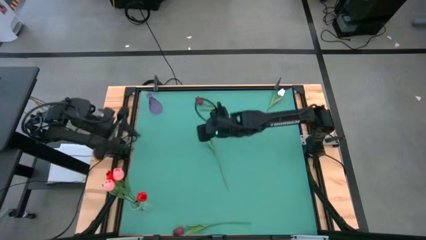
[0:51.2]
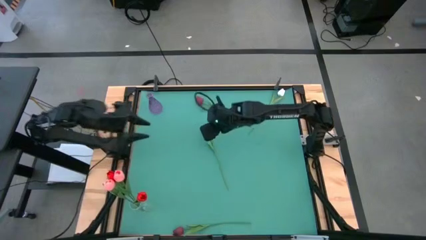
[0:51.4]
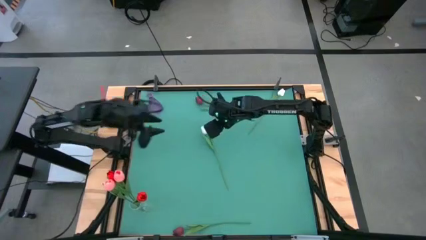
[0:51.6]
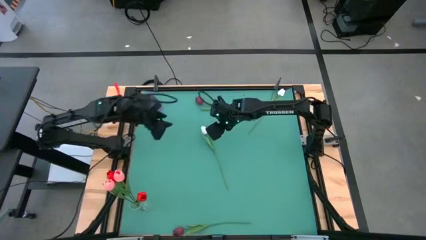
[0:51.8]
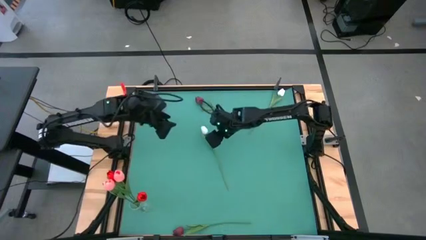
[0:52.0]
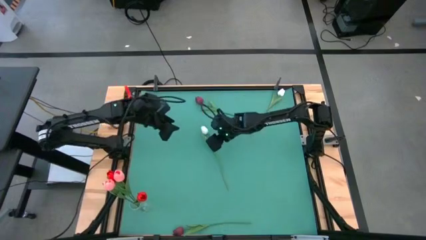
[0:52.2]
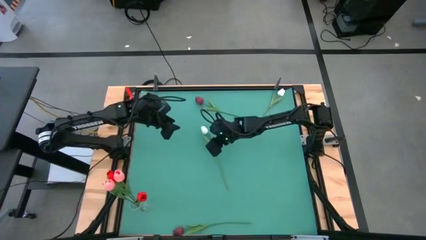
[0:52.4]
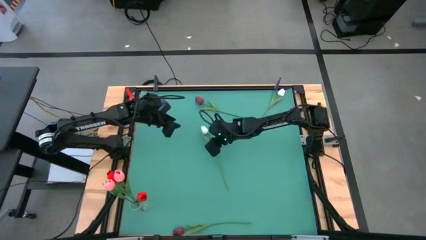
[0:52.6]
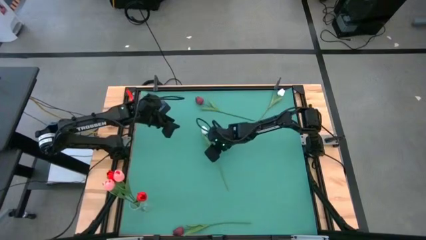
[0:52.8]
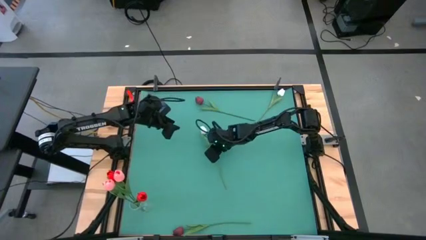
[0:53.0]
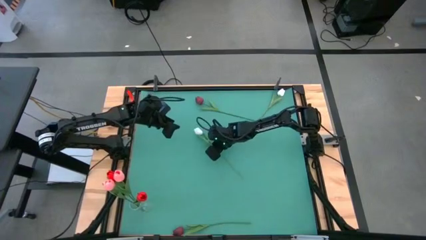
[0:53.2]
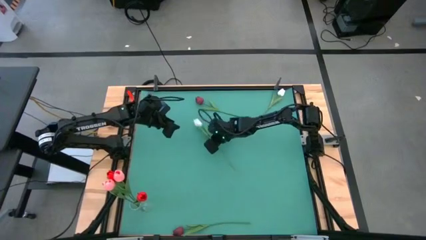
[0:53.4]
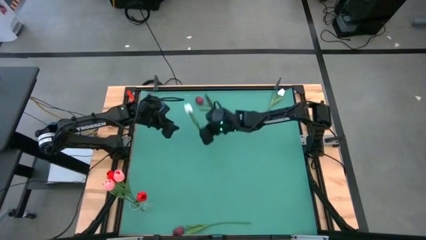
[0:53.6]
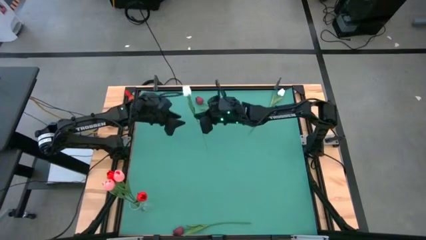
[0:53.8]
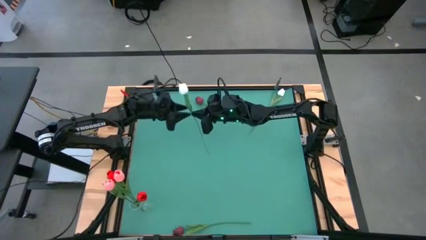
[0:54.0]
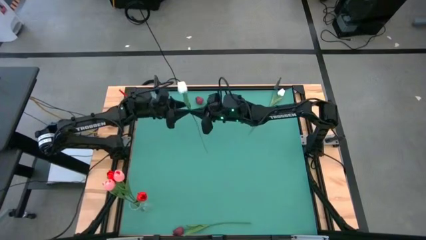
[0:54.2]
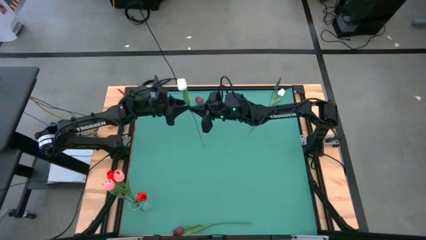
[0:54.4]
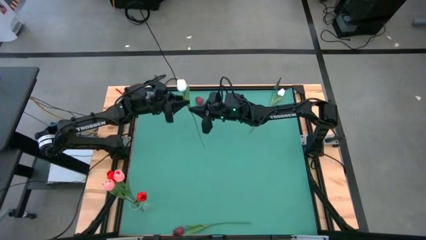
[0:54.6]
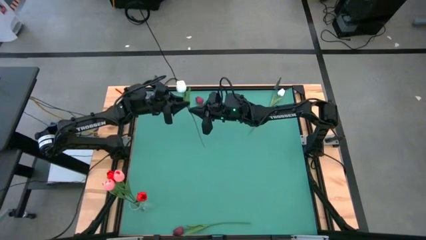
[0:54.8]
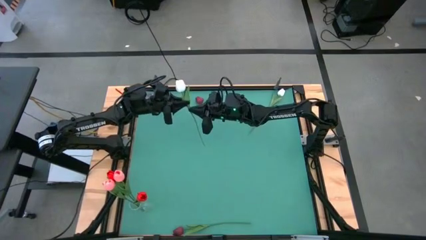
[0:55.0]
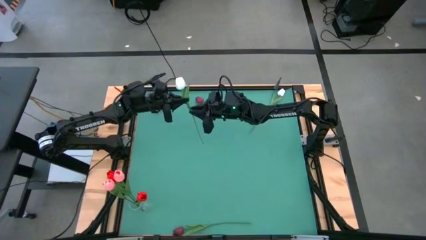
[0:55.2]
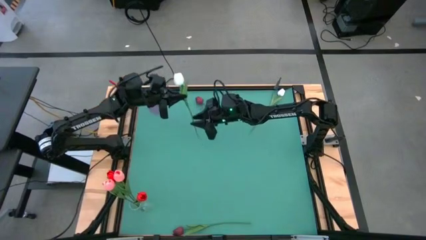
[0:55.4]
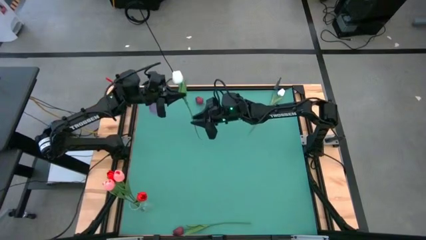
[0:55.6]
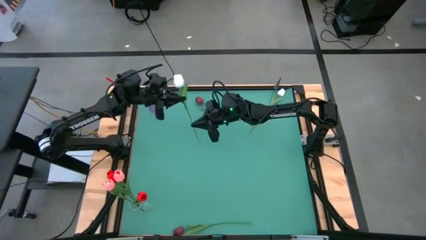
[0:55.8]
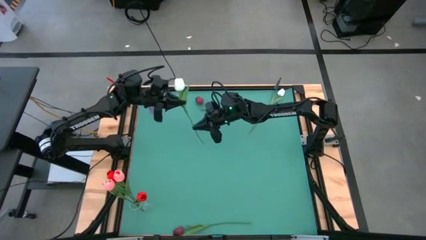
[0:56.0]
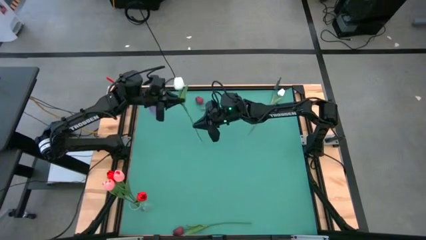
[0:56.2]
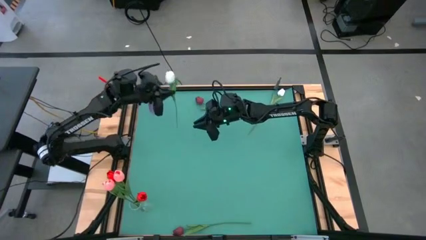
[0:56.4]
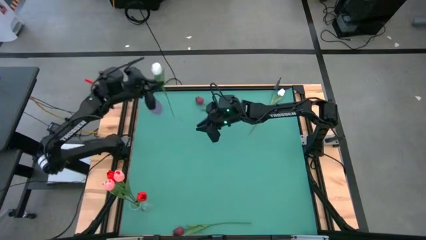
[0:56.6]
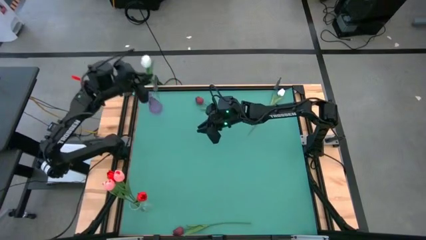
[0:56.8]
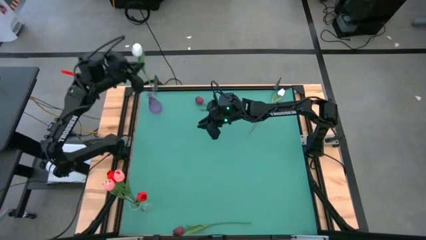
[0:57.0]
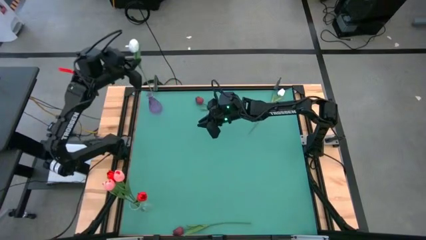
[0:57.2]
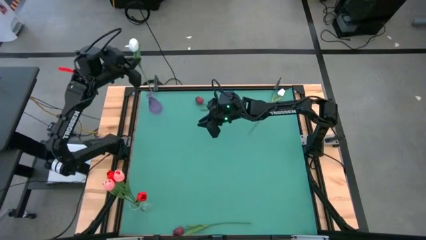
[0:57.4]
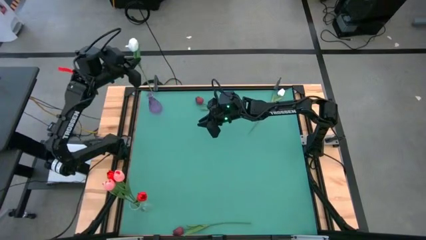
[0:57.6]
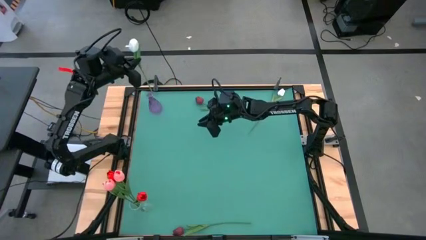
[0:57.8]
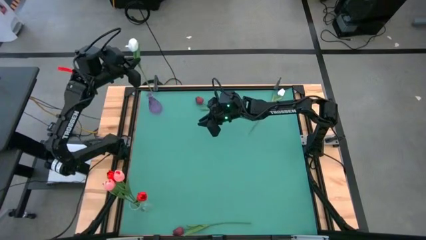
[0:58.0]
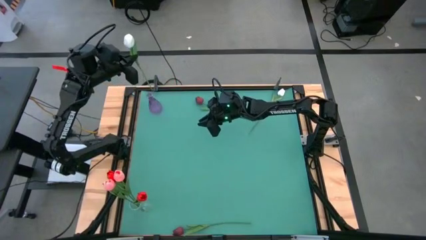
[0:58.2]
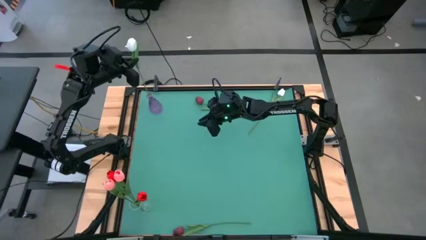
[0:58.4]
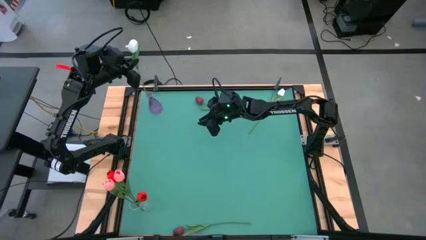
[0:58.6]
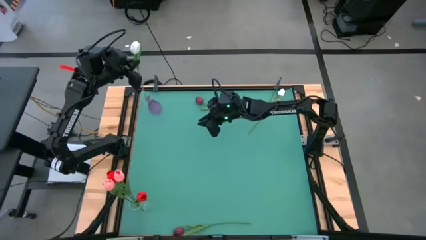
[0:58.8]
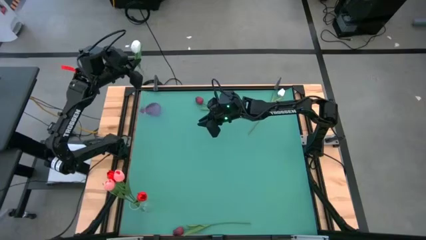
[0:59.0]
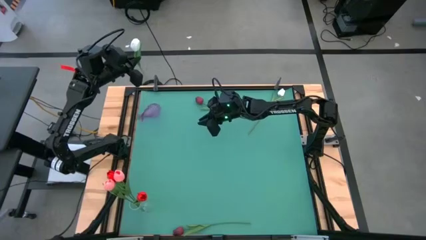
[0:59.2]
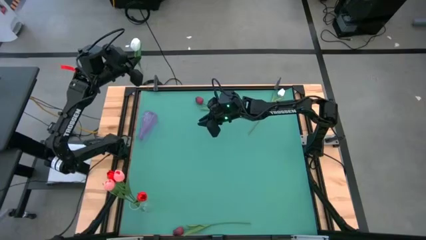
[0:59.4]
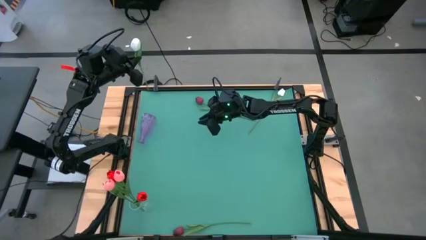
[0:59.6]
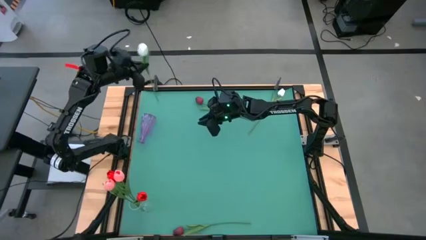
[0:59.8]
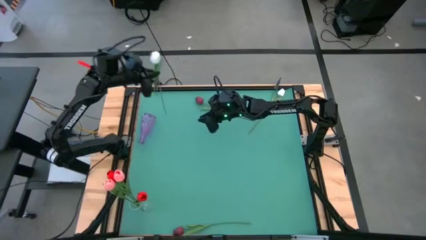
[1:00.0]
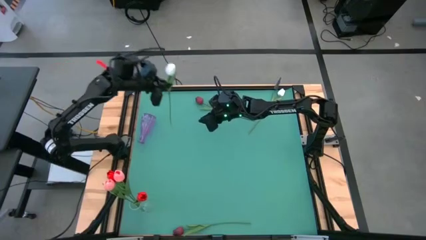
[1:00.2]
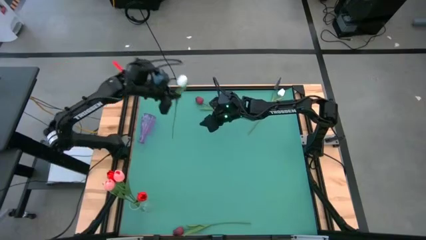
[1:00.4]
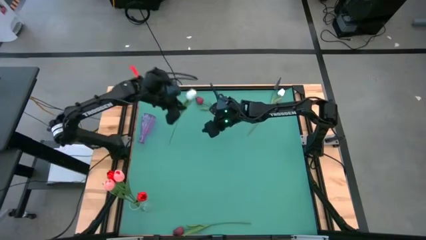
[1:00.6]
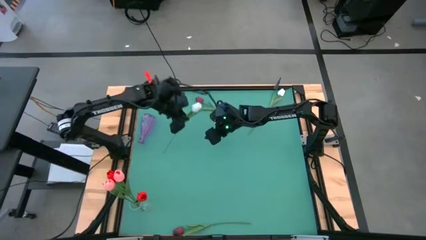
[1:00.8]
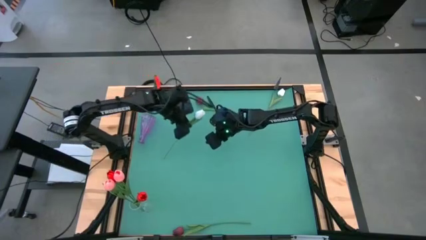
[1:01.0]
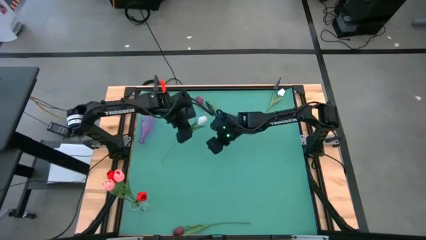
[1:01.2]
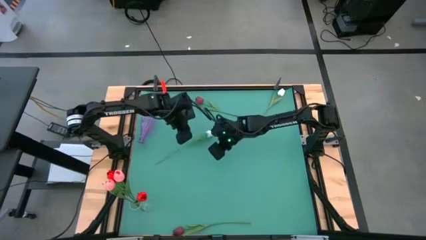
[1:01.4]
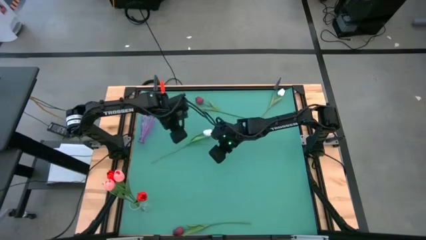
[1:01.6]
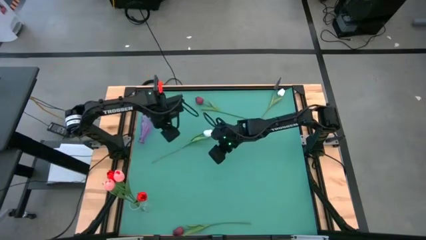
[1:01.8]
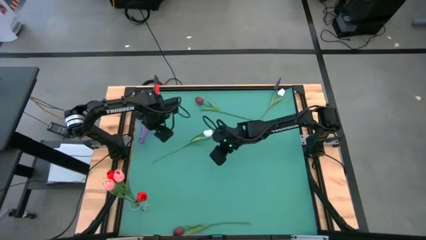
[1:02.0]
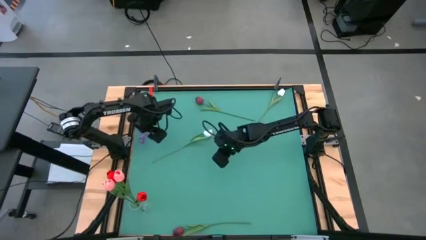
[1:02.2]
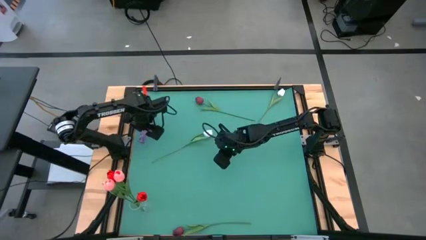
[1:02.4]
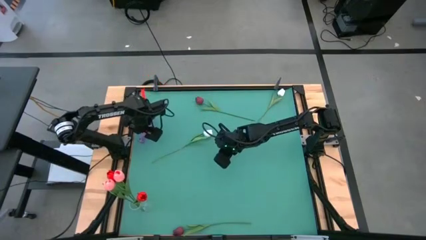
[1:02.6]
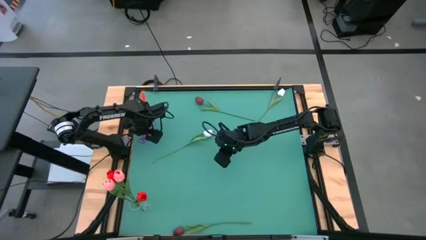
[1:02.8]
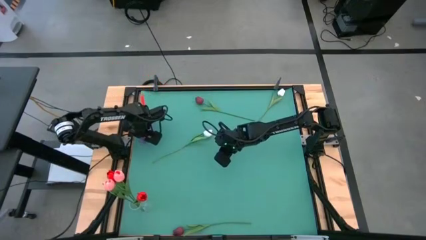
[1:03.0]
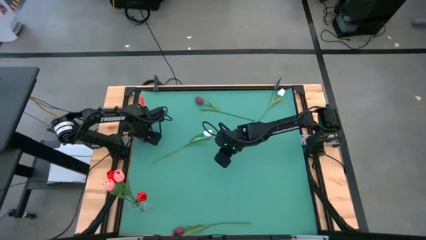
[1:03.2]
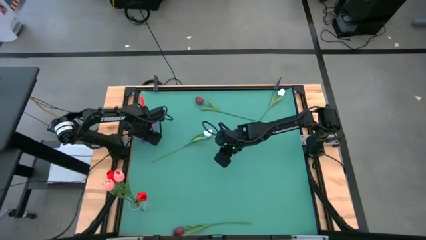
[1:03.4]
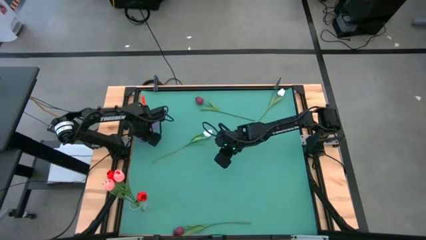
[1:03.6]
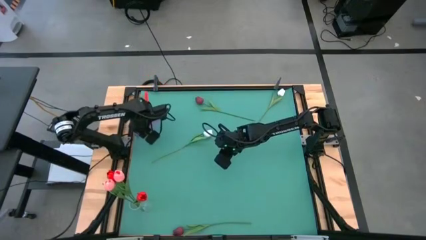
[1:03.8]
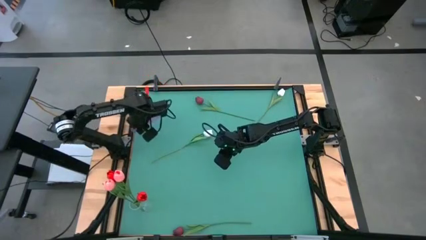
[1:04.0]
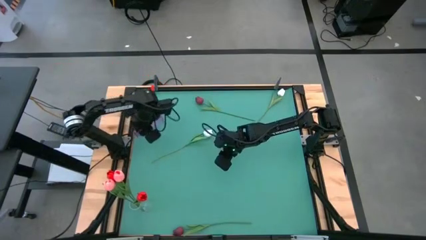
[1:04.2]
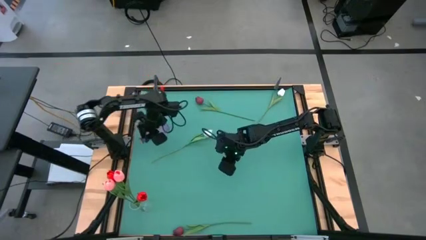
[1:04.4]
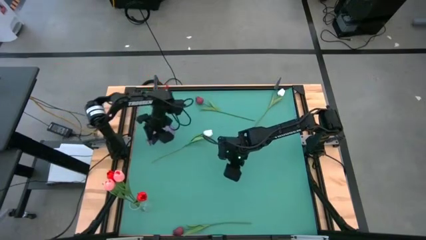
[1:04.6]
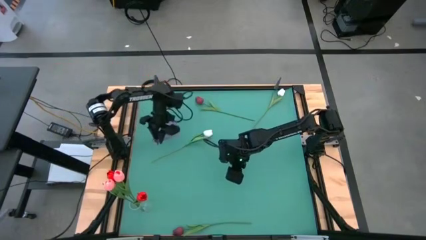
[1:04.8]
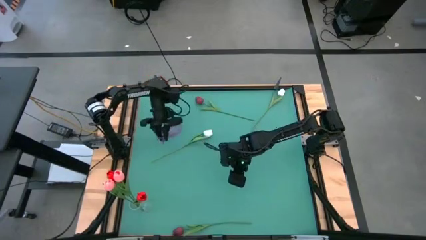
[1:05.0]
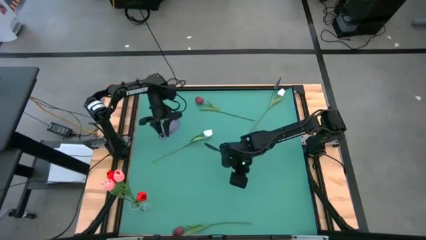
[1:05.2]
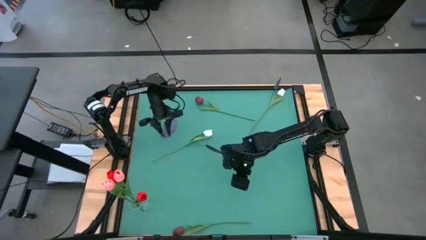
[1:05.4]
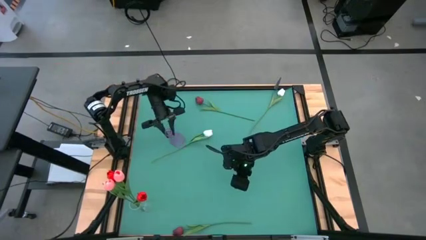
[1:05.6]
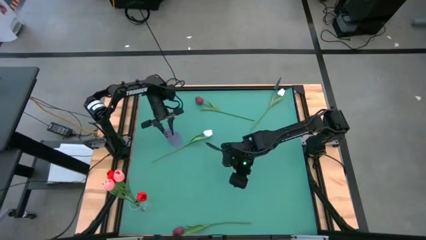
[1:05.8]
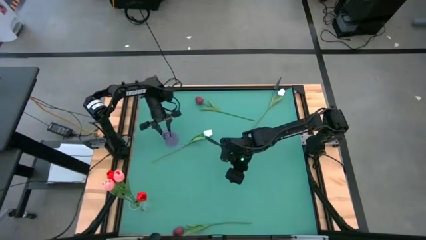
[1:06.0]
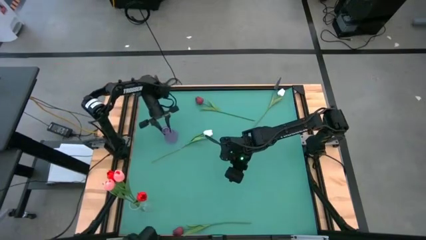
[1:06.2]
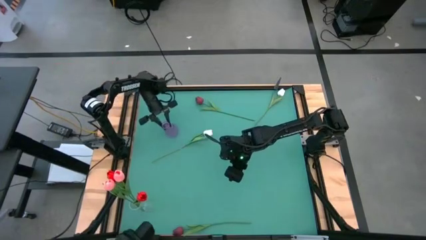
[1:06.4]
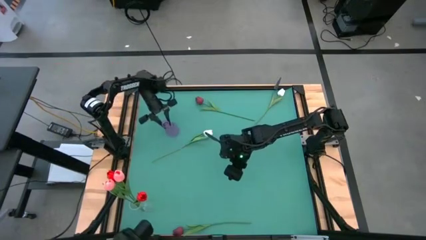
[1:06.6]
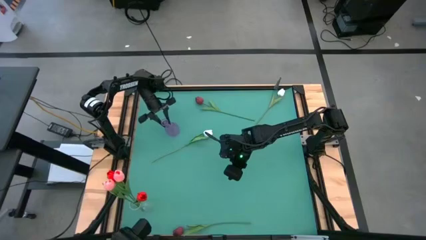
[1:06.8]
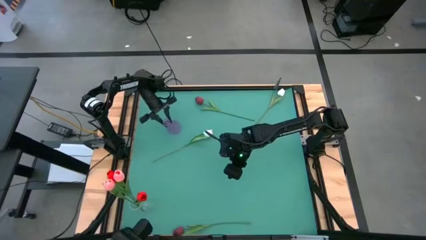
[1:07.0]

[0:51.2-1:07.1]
Task: Sort flowers into vase by color
Put the bottom white flower into the violet vase
